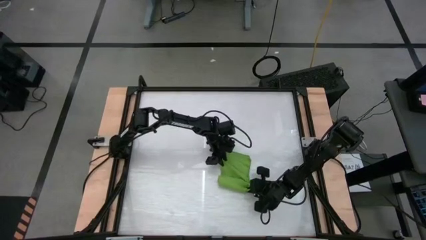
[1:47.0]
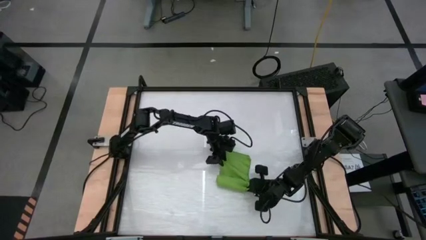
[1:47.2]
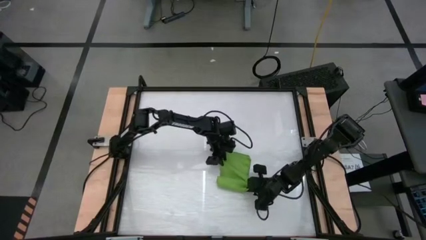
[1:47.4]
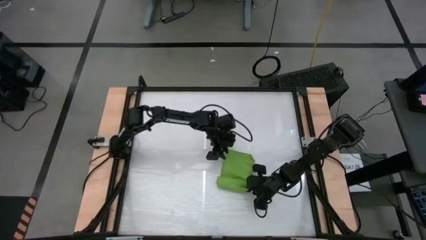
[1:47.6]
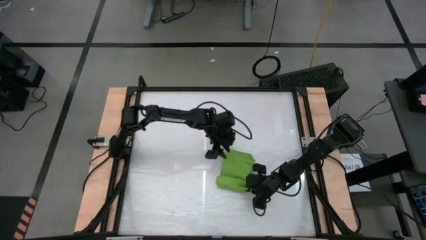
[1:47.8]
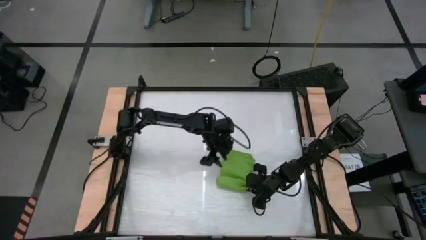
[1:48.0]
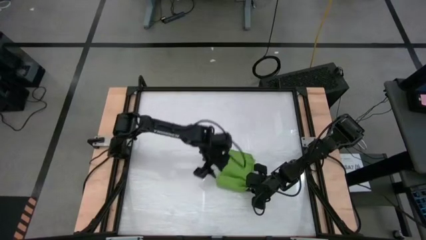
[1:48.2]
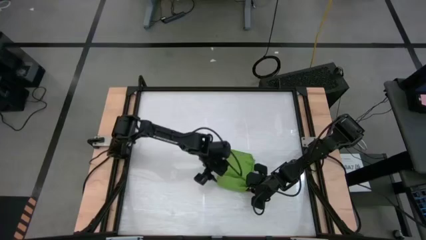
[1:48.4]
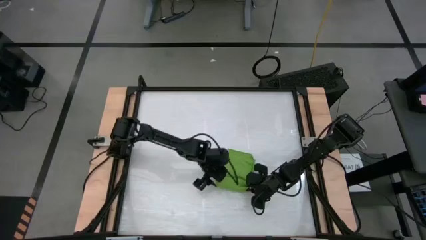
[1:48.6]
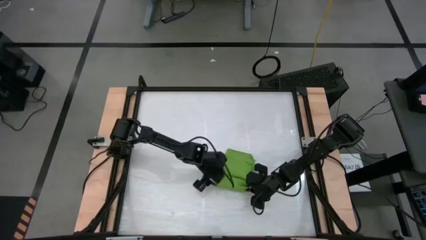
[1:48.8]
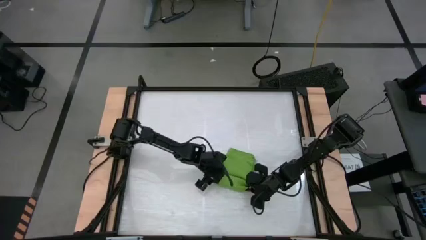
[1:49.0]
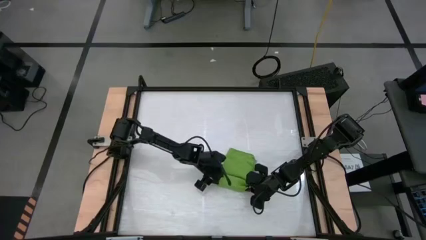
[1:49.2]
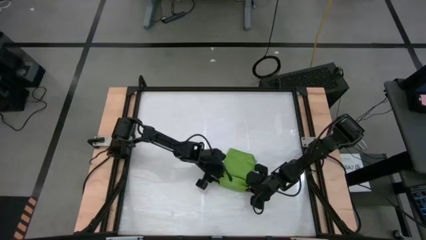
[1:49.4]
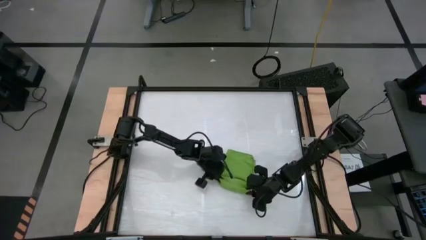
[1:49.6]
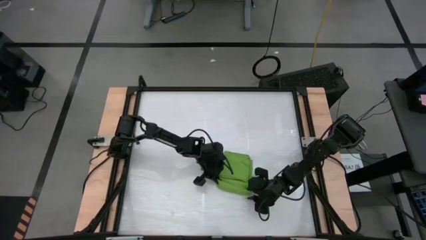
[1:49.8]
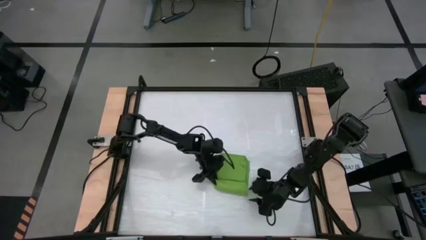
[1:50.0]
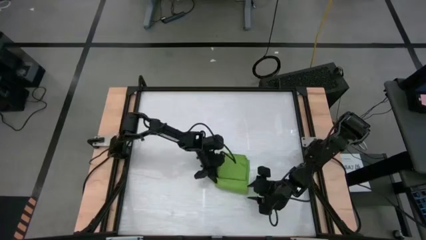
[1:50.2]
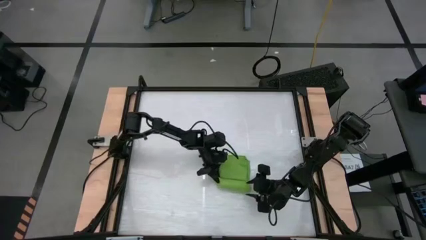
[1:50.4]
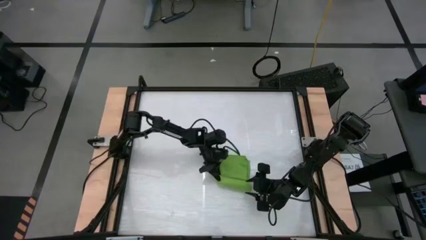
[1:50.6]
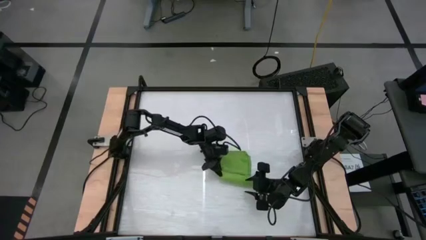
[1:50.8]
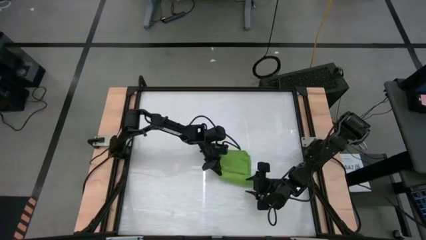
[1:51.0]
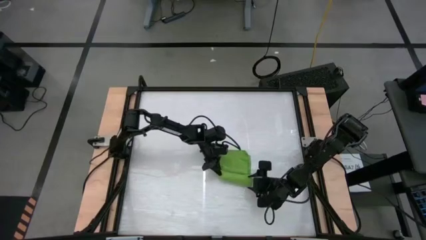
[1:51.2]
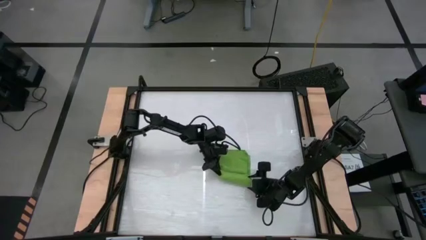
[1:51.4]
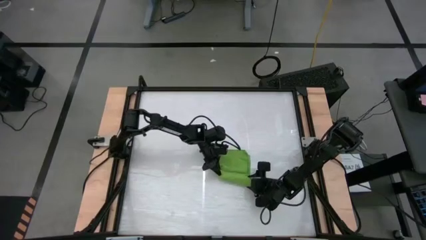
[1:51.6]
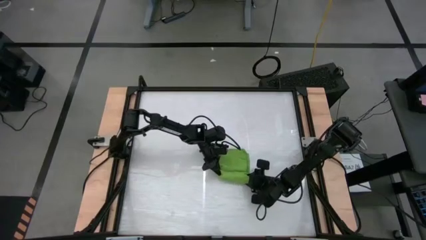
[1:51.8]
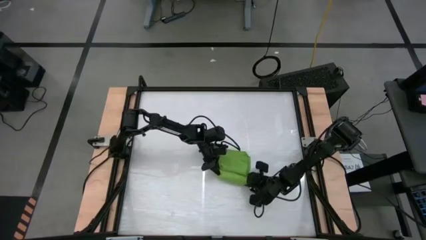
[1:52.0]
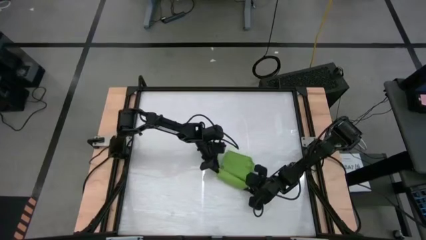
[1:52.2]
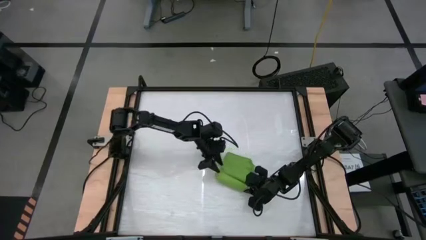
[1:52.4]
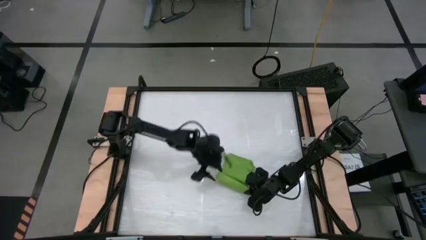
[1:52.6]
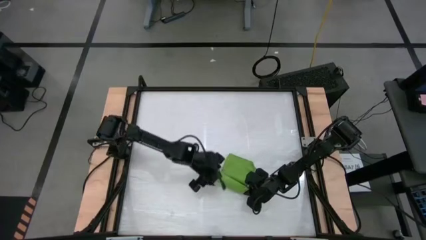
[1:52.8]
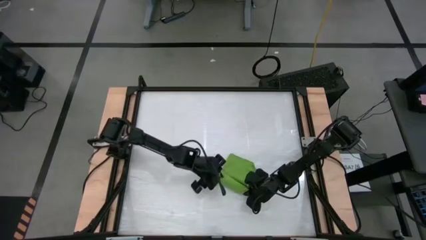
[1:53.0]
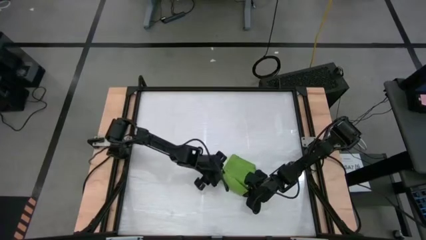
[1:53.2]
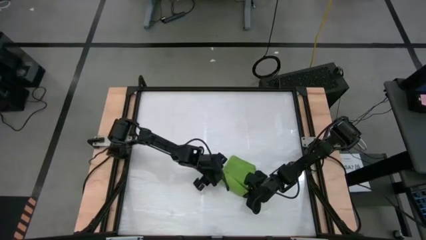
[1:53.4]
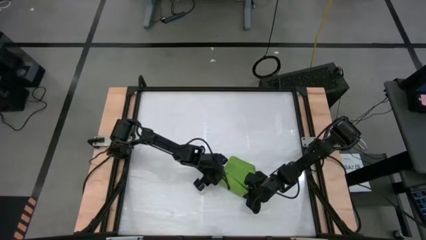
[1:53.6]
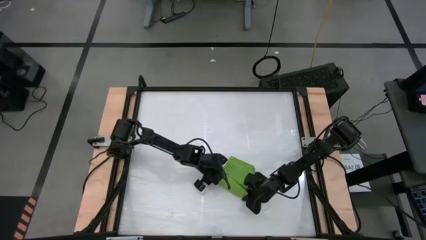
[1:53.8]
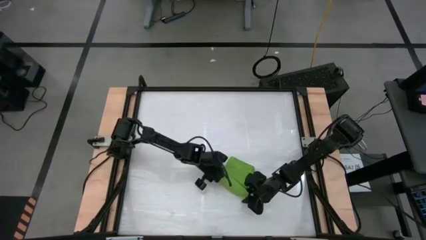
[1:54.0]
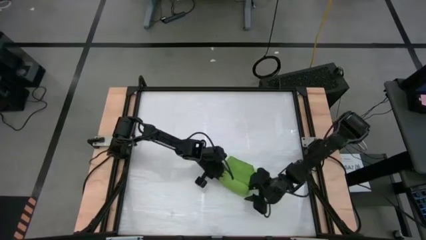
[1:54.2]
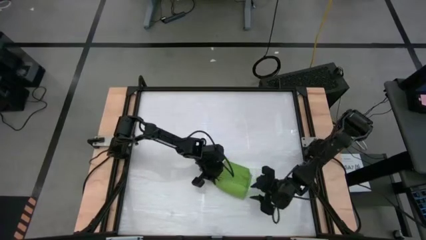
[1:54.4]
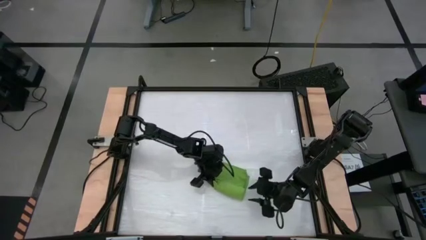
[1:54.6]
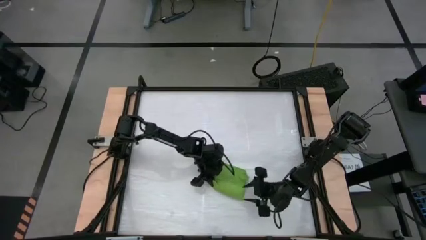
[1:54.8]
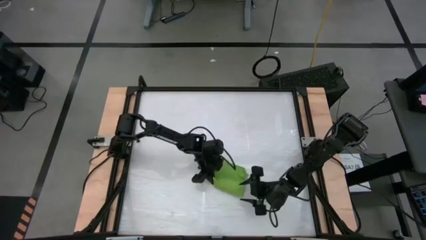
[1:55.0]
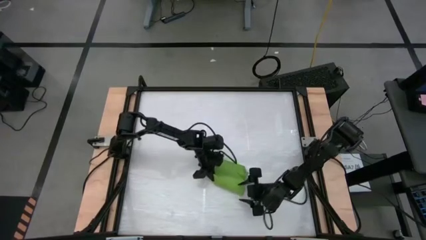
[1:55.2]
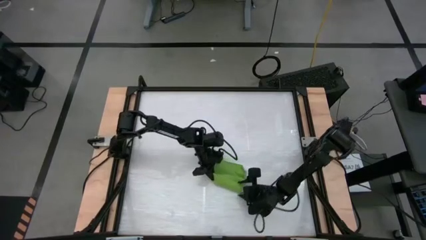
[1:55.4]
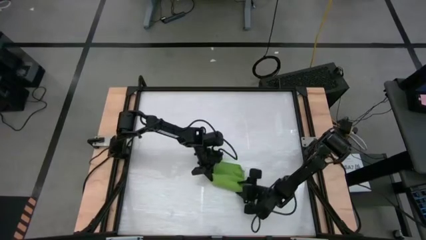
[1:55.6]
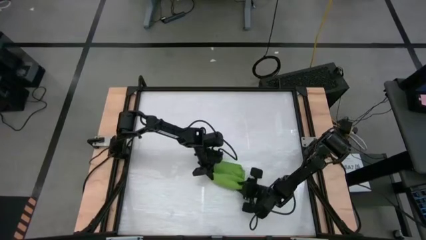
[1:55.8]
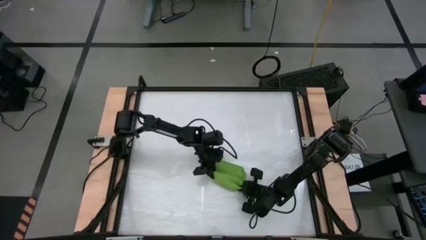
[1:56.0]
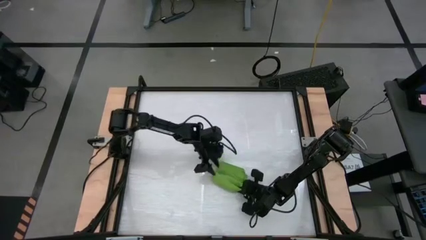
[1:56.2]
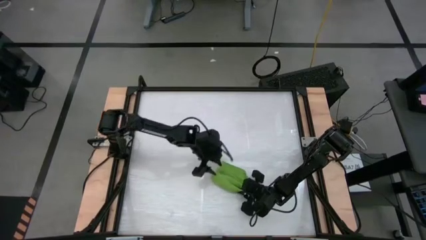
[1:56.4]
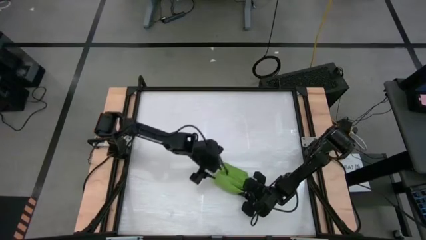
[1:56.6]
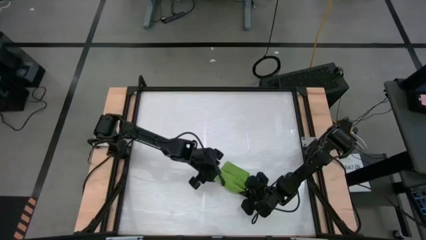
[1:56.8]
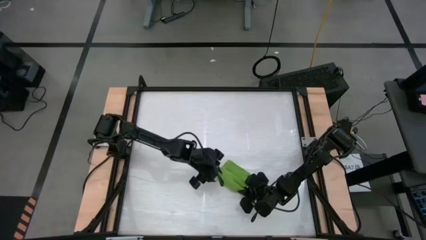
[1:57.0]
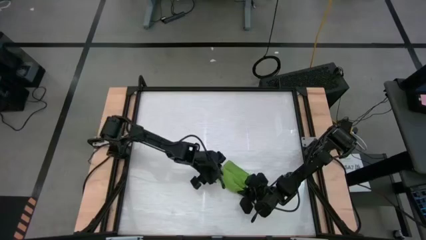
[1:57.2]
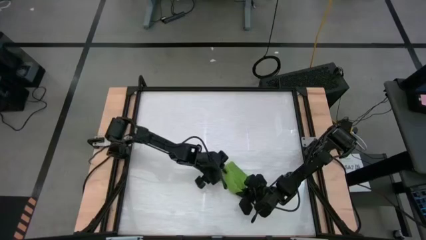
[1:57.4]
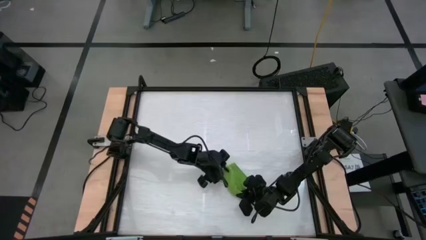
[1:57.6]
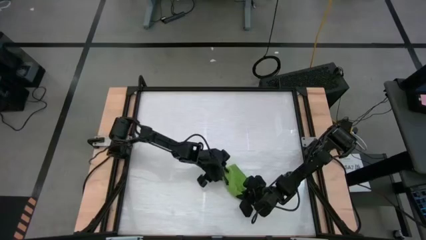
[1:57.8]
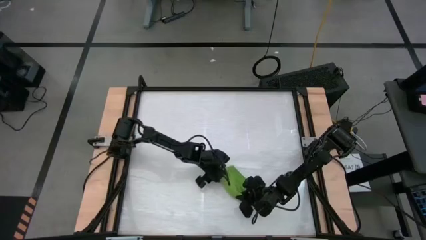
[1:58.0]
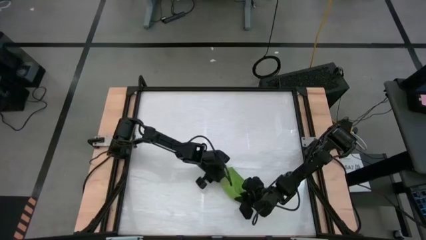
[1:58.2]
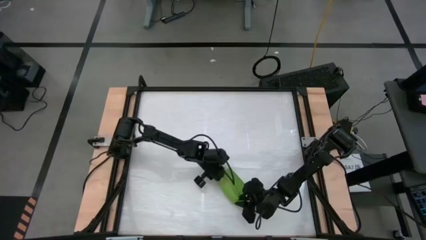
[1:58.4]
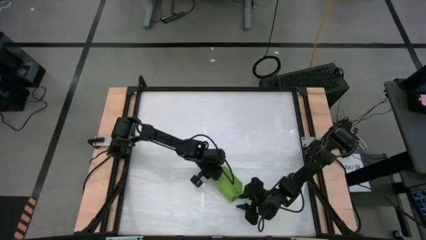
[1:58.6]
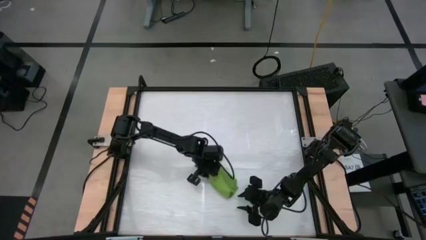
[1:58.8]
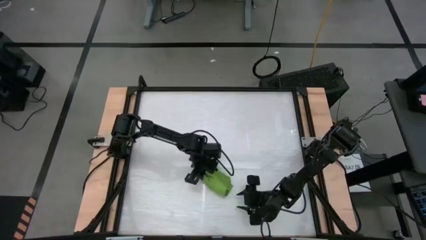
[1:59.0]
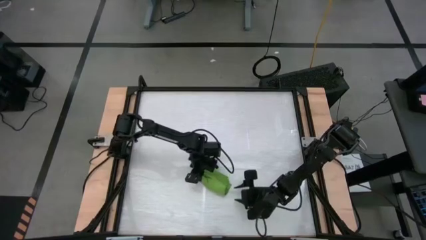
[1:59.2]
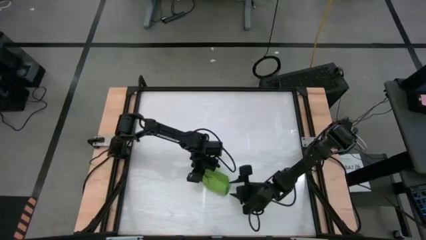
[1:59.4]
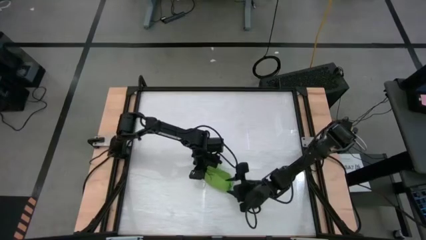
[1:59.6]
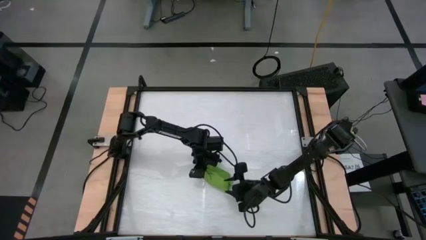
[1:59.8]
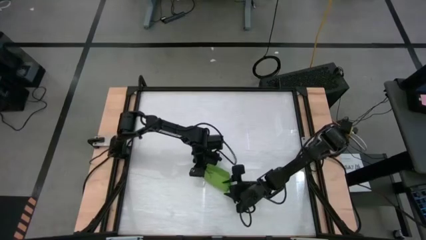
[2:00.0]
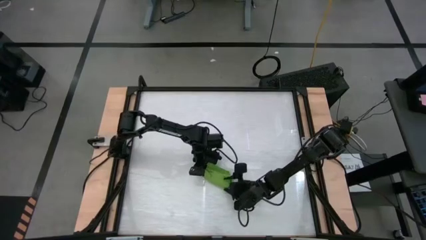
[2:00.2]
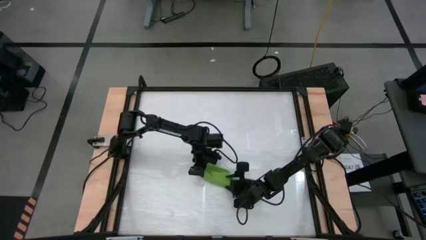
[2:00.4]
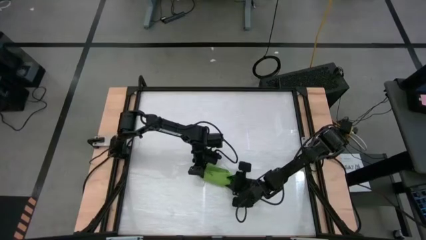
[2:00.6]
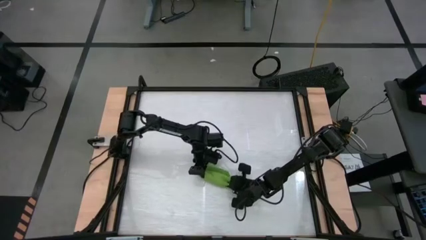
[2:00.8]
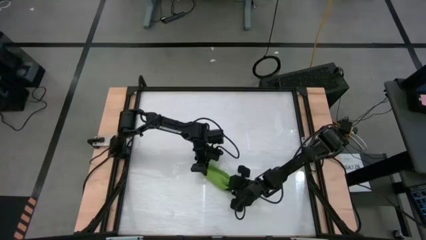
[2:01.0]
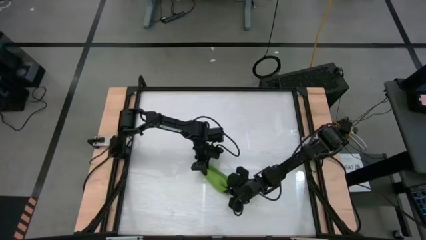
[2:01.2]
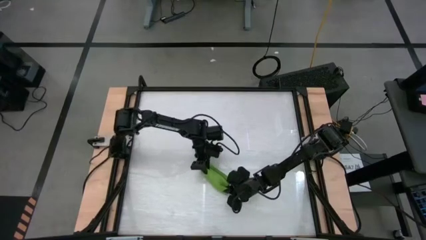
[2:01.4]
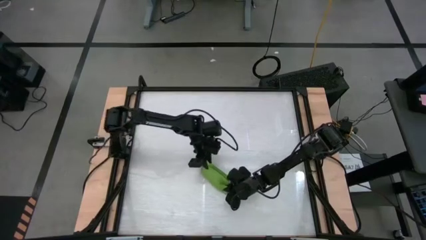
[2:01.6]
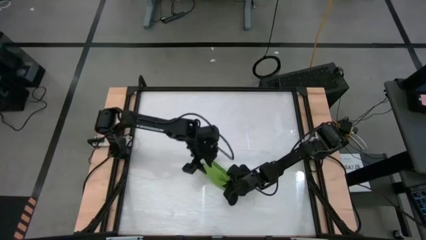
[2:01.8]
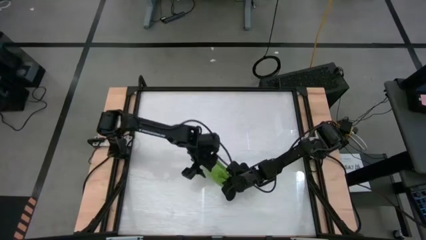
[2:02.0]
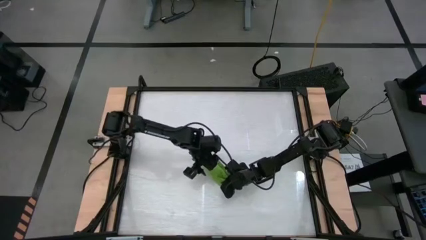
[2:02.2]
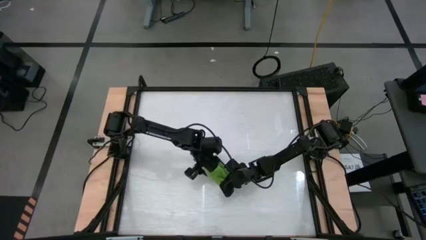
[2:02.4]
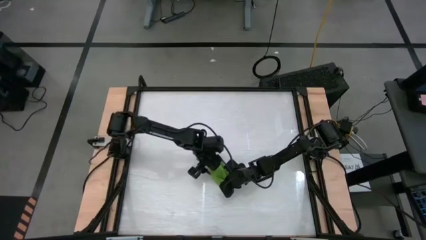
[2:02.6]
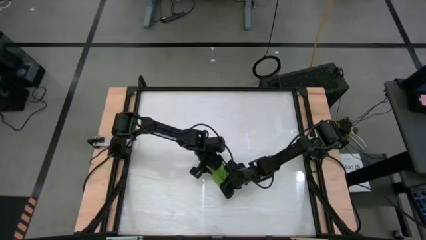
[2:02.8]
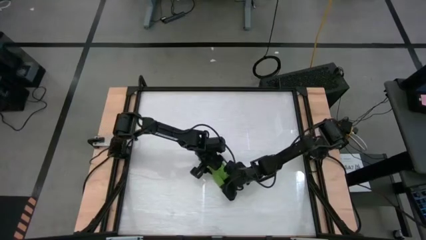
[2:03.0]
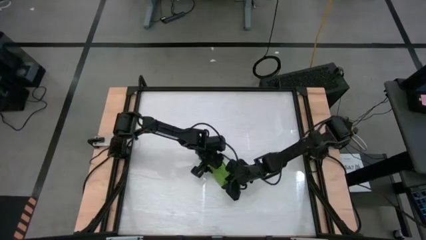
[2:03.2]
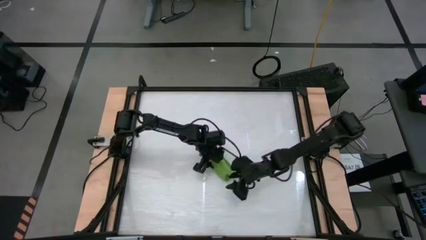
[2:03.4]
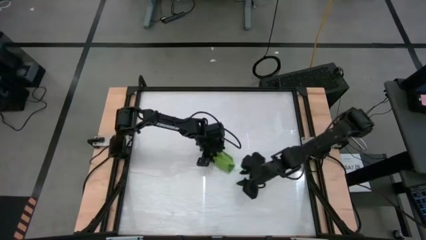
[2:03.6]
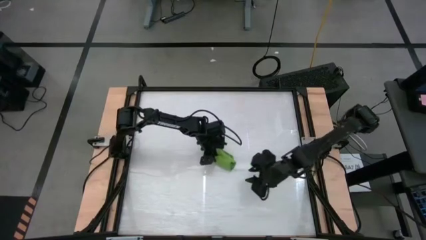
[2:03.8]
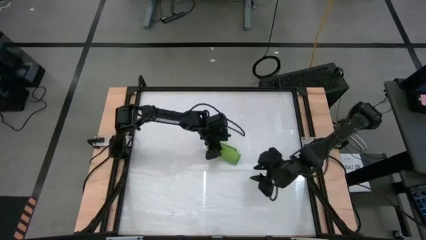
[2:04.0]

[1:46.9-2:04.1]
Task: Roll towel
Roll the green microfiber cloth
